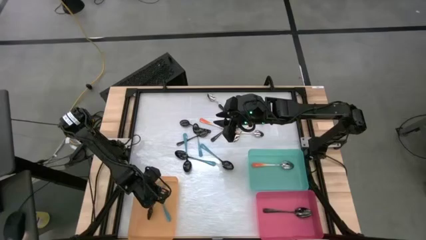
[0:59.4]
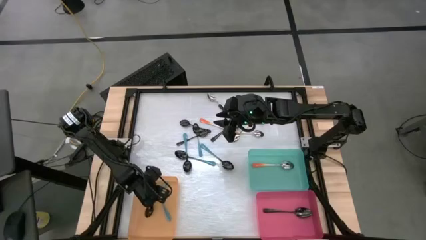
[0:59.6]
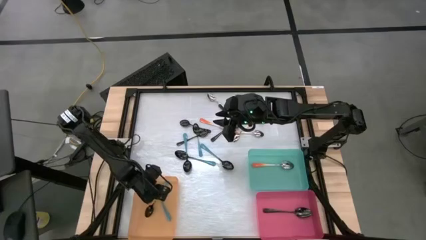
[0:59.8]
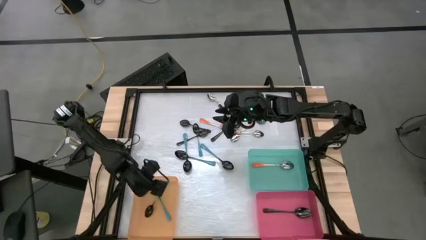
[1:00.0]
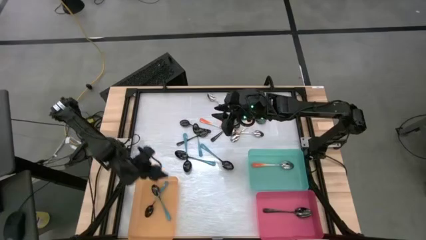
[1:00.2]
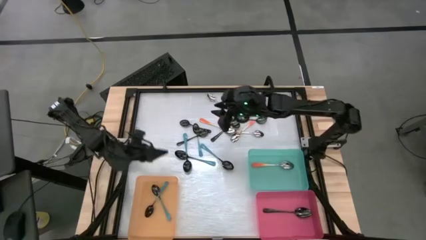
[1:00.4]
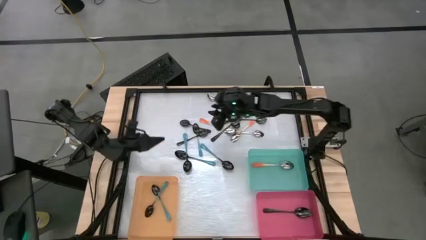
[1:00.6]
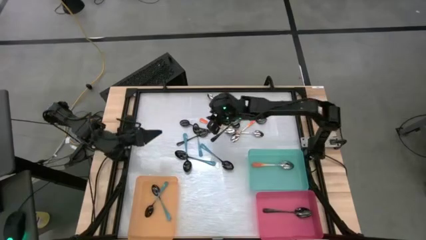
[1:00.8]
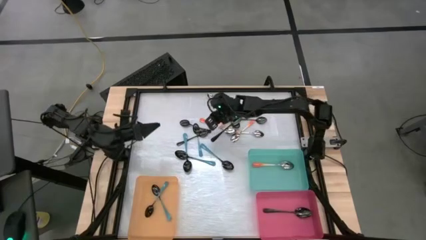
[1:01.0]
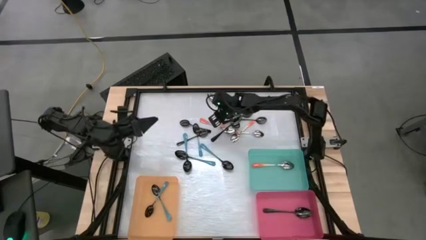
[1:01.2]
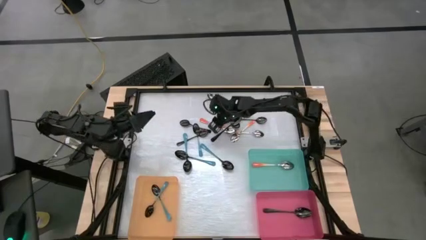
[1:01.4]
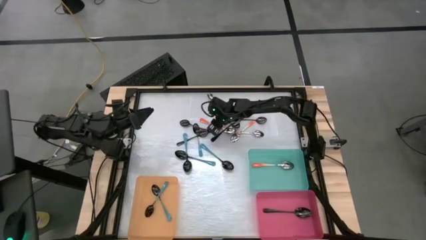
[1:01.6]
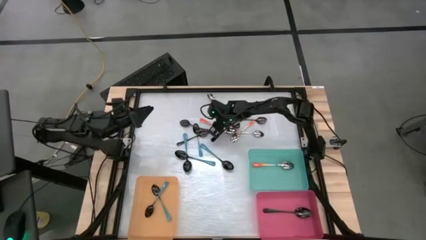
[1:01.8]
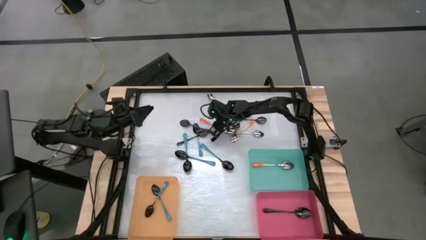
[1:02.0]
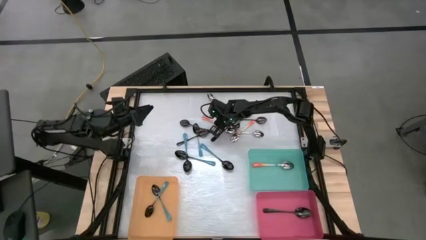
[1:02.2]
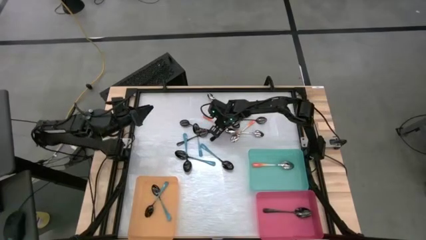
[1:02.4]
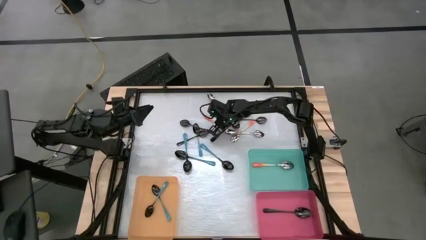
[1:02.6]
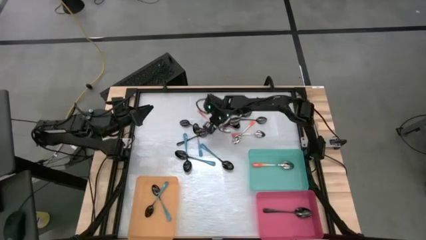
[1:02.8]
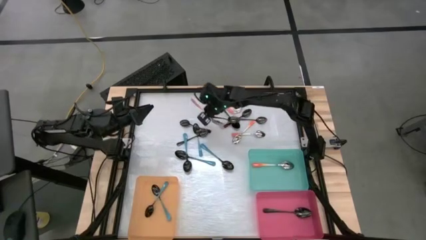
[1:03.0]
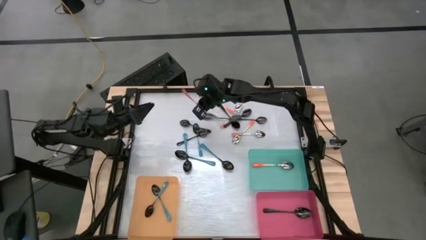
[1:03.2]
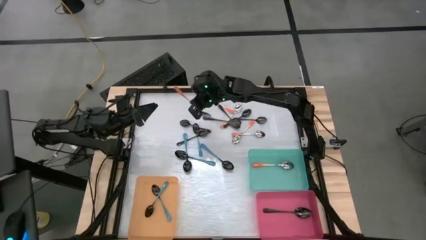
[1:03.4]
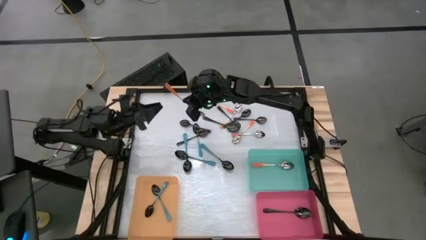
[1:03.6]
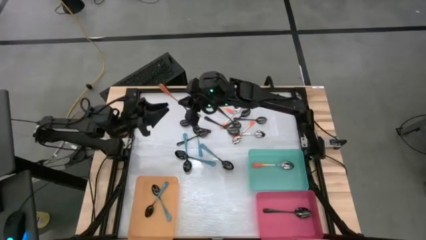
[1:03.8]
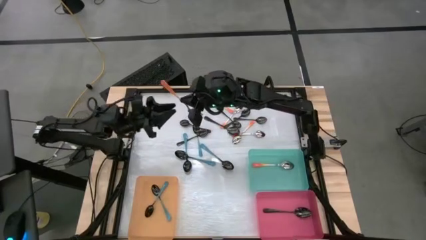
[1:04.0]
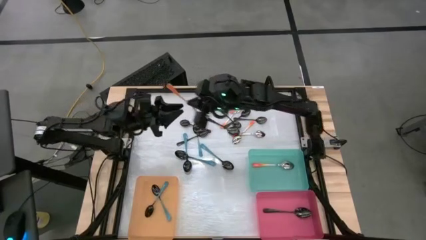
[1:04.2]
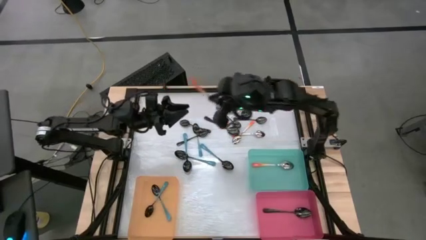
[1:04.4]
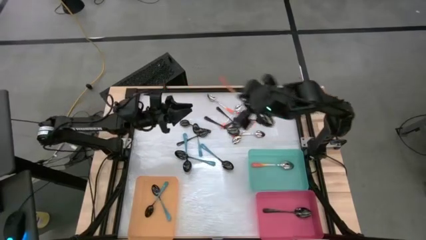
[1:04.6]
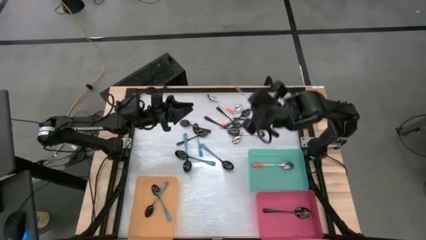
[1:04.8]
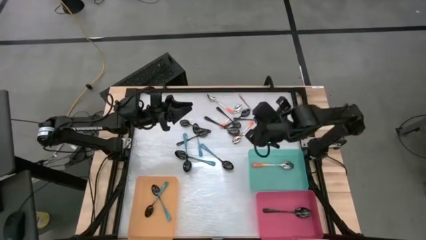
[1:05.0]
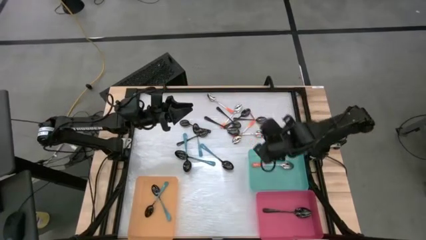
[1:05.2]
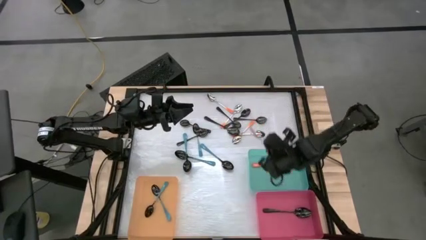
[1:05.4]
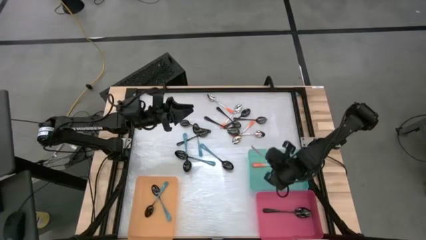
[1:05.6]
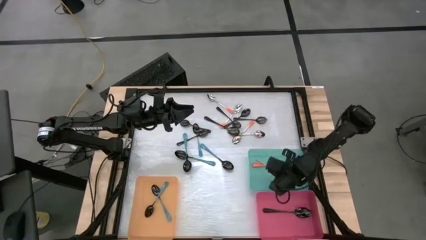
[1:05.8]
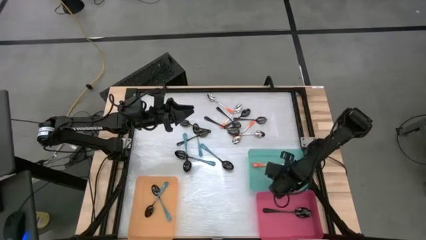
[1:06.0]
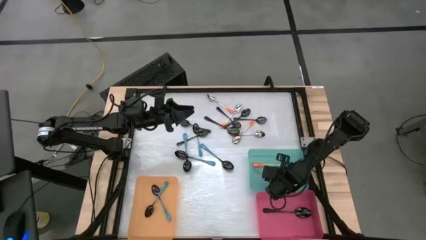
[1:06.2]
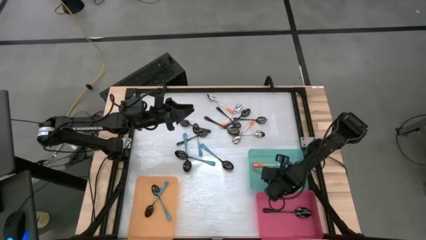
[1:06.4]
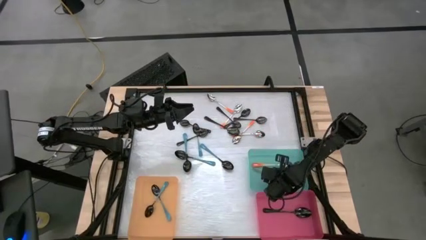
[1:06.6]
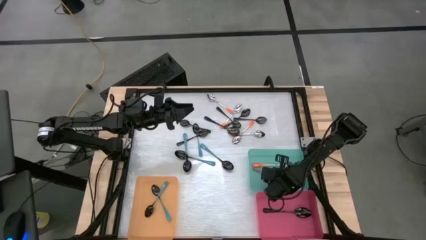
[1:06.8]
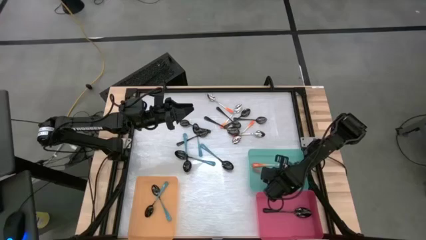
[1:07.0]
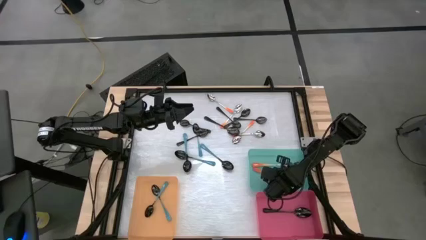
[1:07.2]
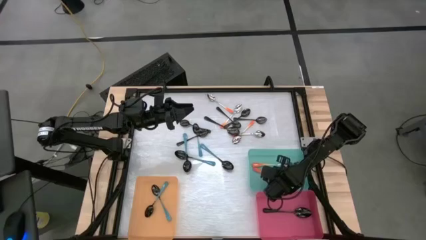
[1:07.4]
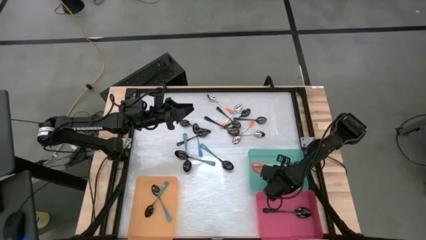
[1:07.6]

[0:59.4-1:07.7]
Task: Sort silverware by color (type)
Put the orange spoon into the blue bin

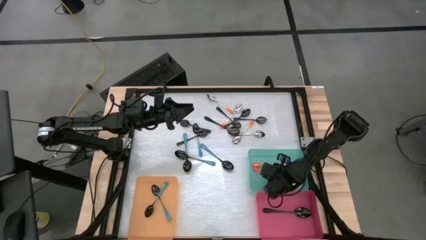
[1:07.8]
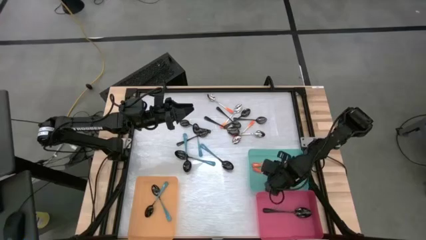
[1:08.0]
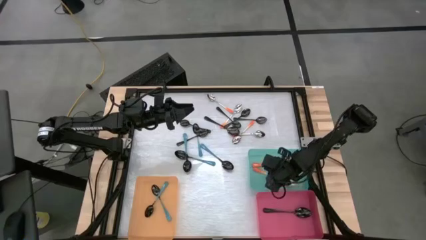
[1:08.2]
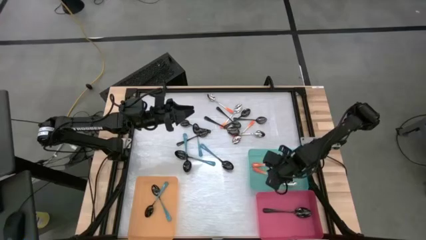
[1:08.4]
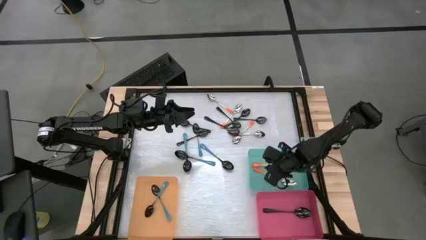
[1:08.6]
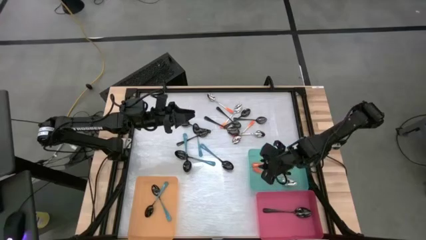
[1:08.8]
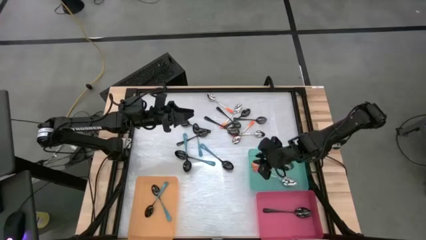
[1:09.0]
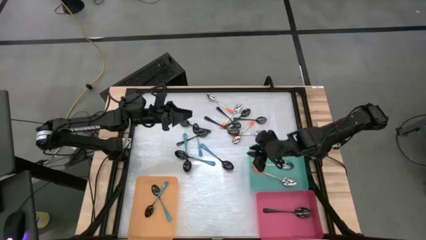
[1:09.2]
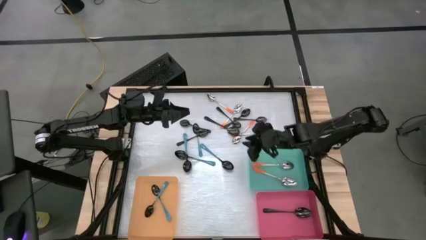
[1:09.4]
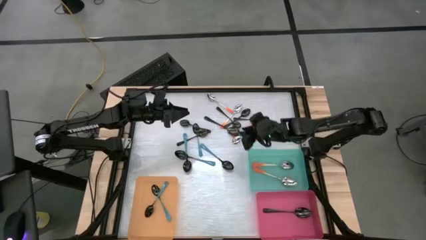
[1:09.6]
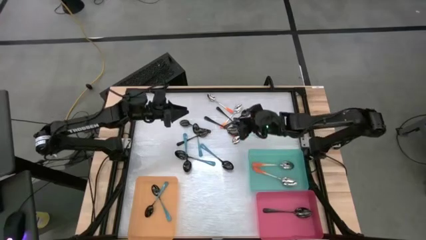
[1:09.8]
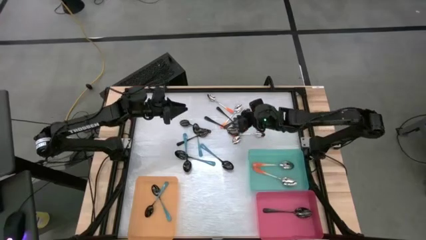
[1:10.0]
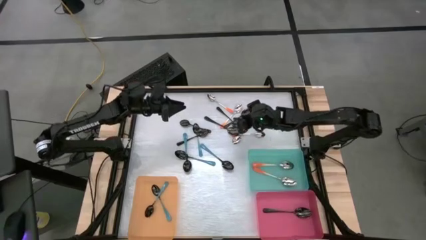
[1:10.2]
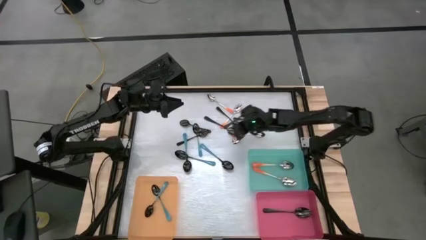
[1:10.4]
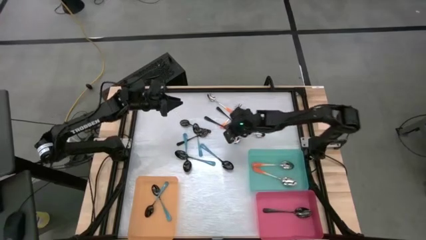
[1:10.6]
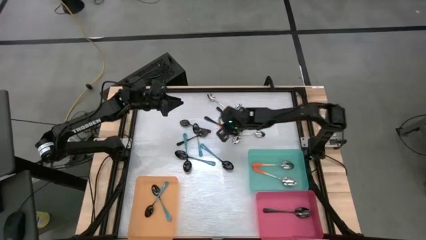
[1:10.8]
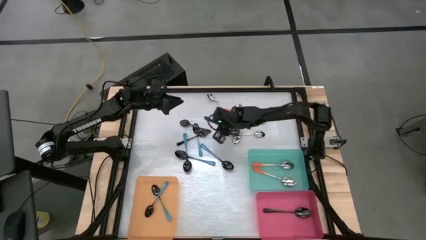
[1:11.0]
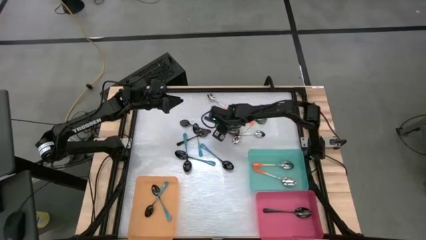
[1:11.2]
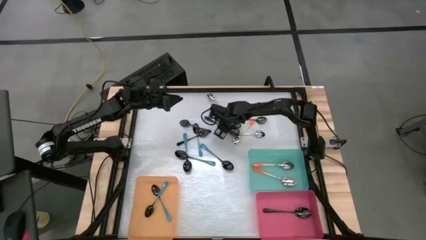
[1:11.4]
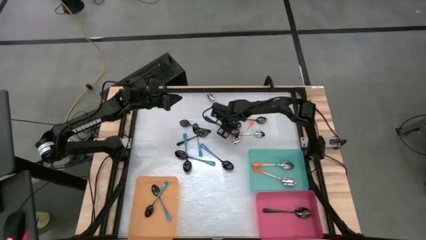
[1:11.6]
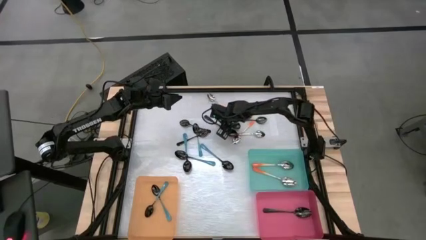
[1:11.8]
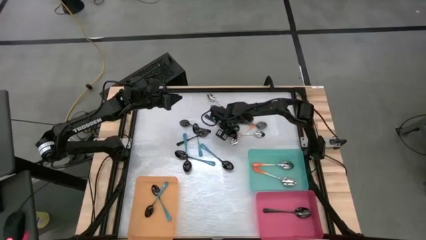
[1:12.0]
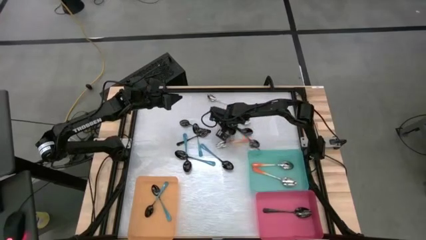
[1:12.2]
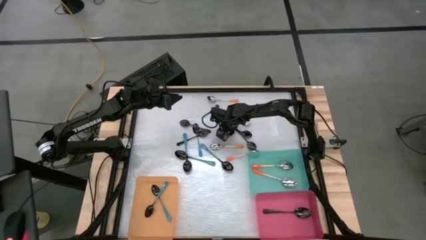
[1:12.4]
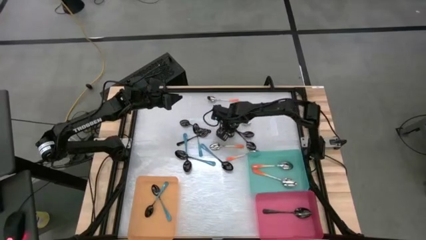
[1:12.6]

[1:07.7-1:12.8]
Put the black spoon into the pink bin
